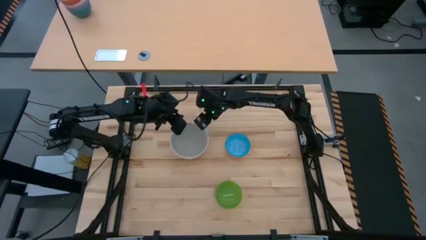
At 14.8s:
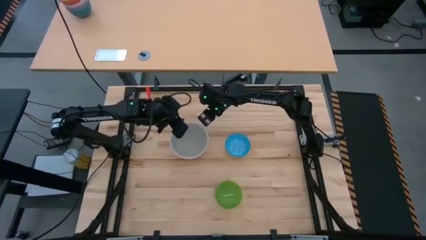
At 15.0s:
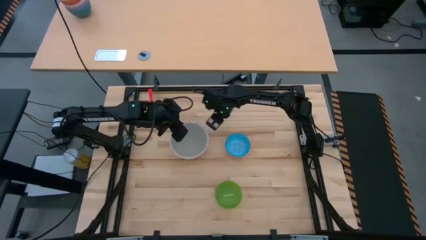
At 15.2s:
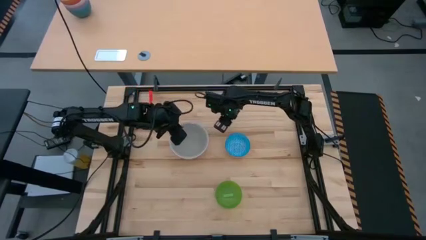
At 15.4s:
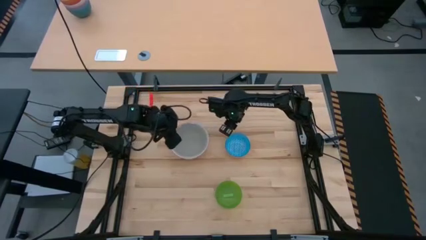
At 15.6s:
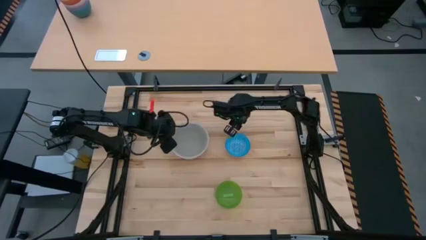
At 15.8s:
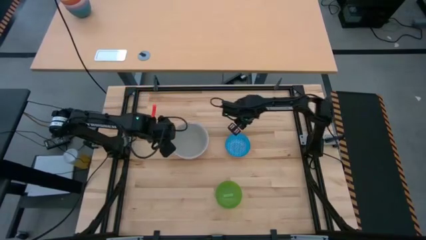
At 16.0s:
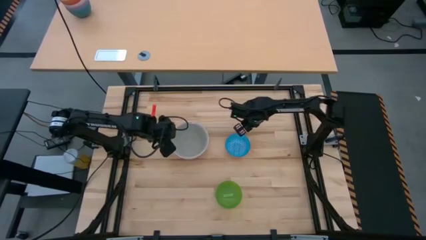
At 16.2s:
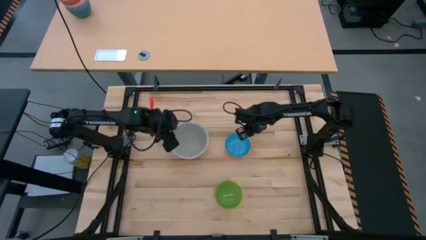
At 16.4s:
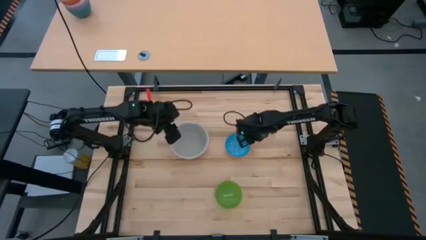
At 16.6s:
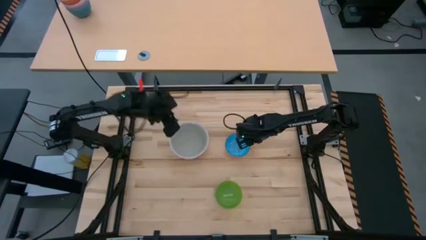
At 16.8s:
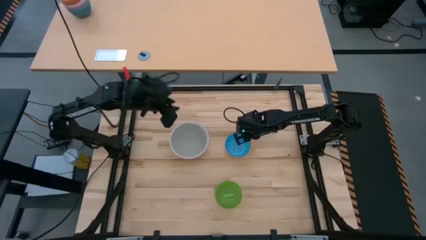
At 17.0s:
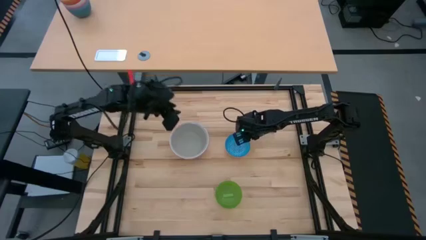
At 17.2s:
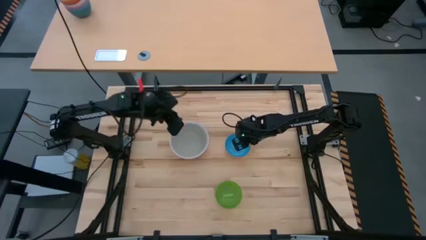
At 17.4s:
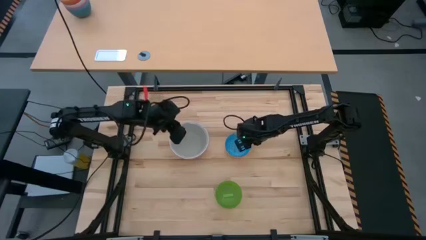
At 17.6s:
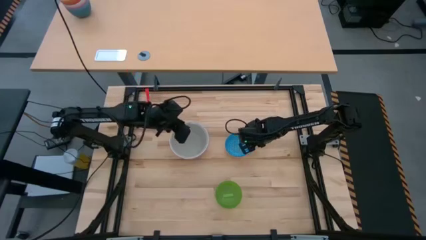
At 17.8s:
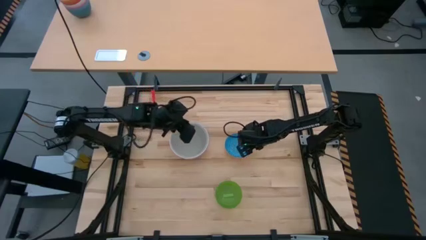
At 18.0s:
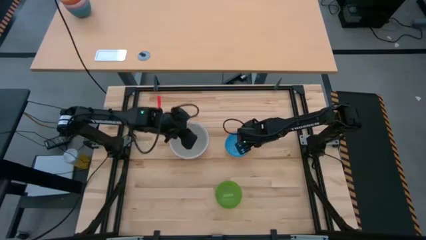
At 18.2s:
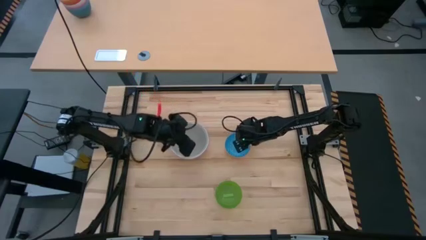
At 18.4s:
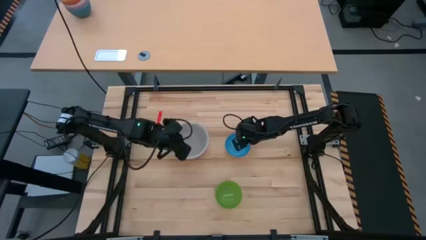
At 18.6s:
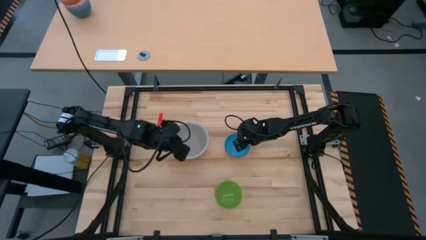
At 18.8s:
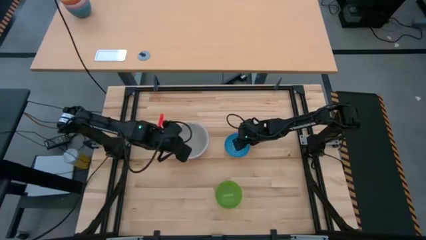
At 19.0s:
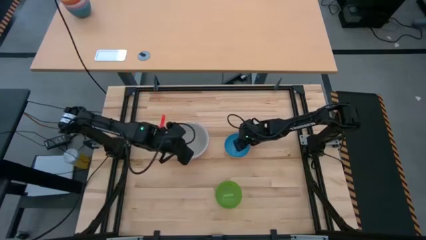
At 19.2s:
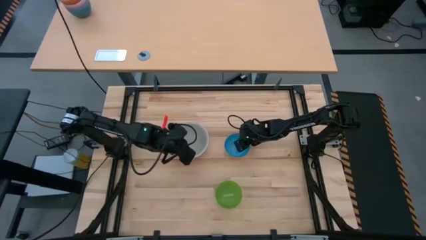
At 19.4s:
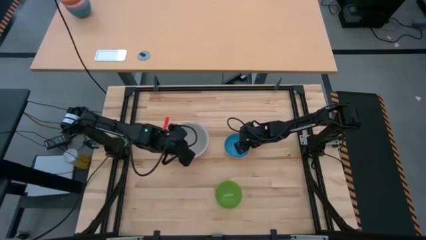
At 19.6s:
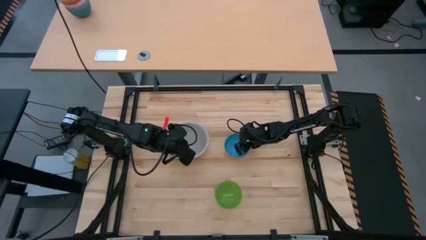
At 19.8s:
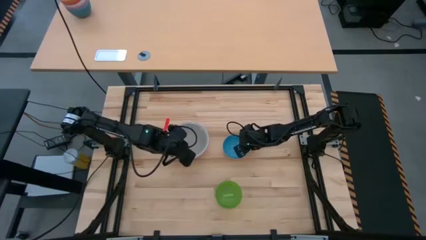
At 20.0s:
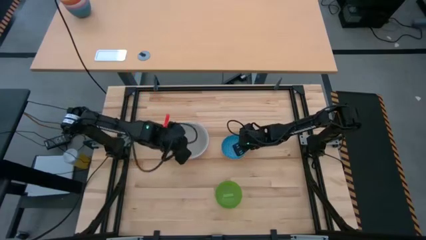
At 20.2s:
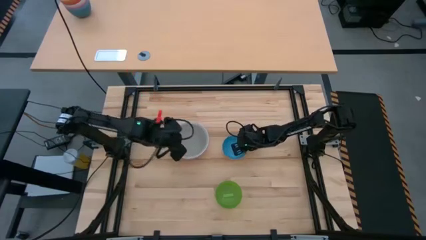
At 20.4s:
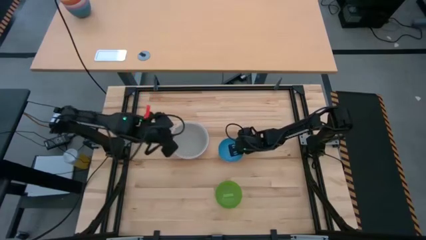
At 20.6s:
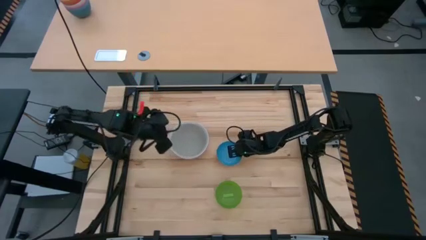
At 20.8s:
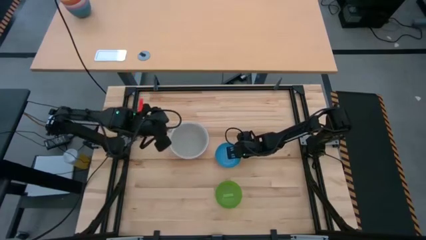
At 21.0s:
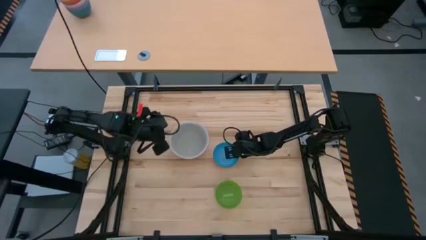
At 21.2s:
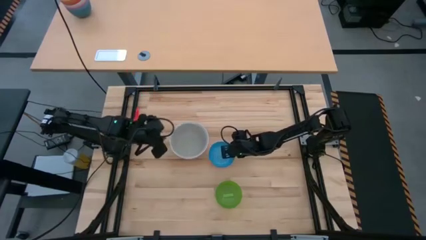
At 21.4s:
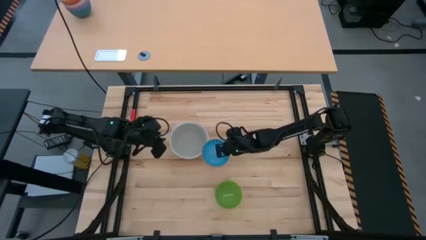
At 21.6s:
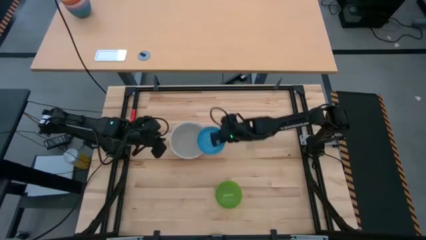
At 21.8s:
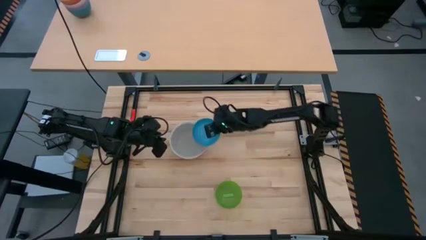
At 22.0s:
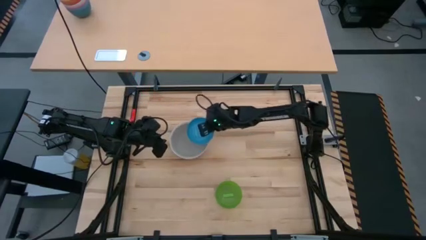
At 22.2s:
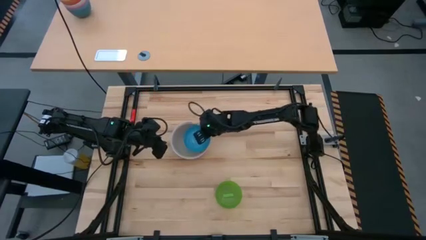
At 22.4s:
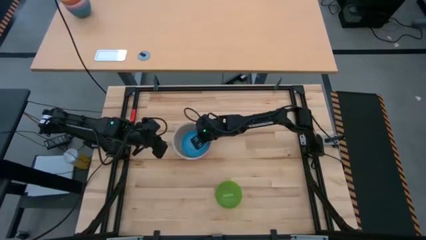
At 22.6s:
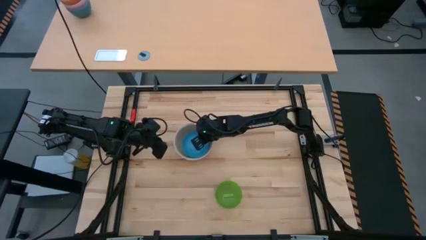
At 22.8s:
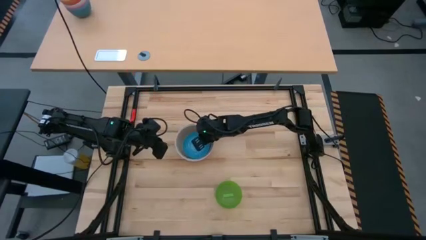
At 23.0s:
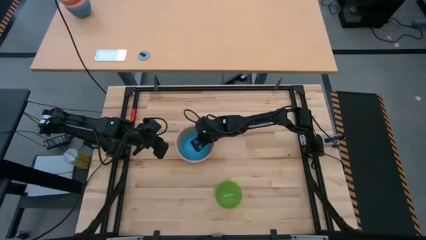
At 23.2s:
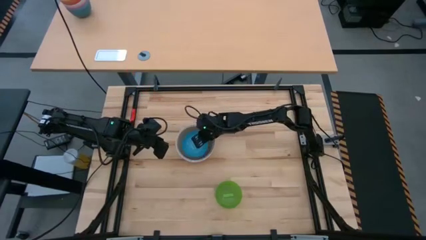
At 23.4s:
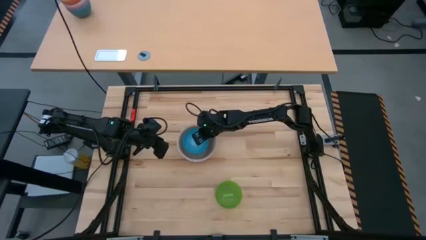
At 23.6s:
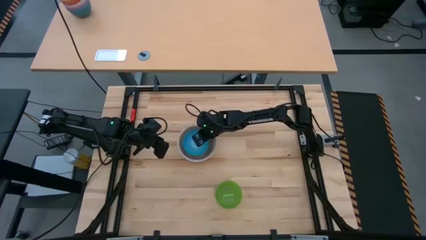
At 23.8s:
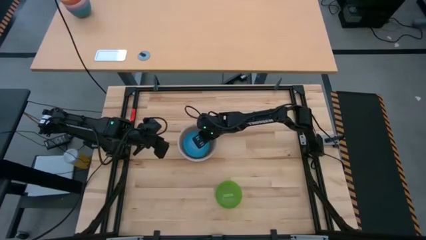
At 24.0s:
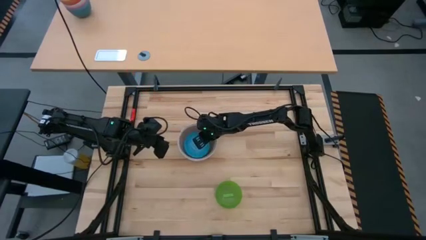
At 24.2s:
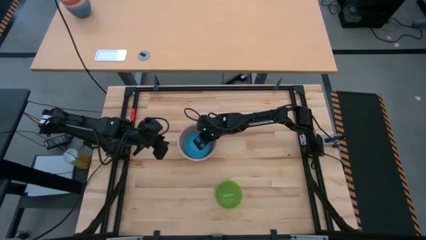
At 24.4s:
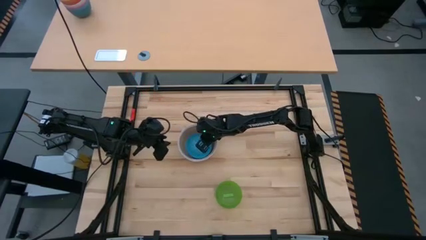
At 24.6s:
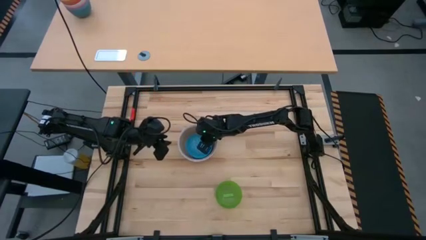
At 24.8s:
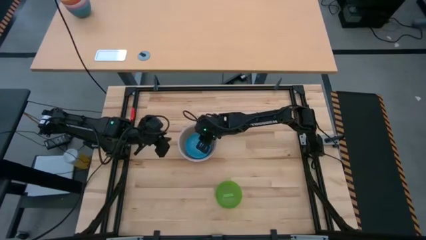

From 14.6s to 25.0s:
Stack the blue bowl on top of the gray bowl

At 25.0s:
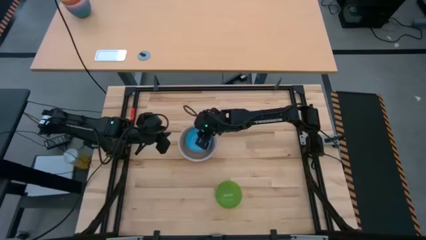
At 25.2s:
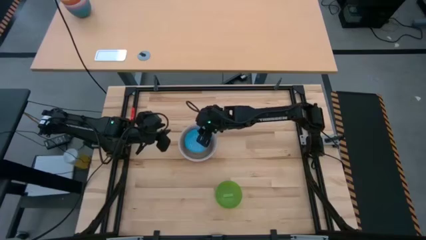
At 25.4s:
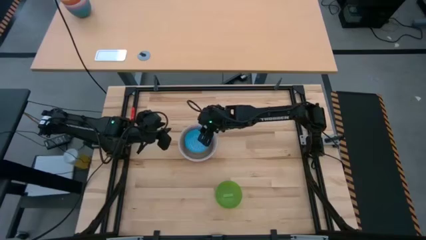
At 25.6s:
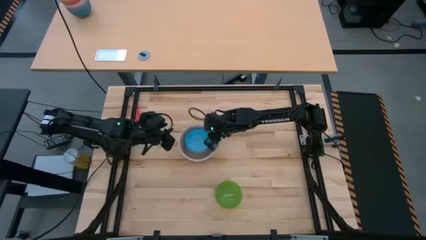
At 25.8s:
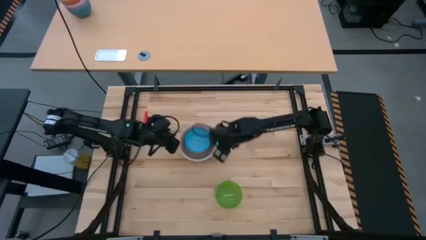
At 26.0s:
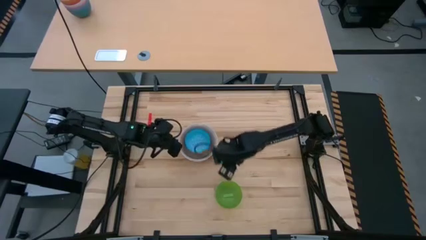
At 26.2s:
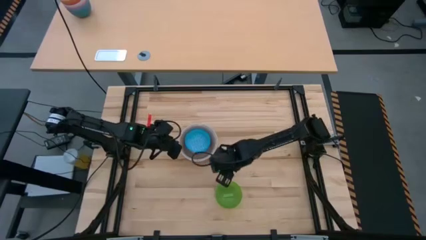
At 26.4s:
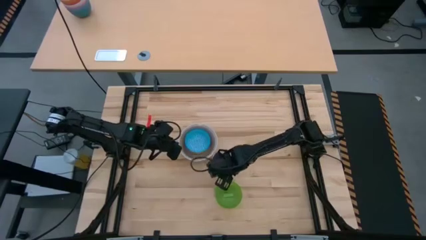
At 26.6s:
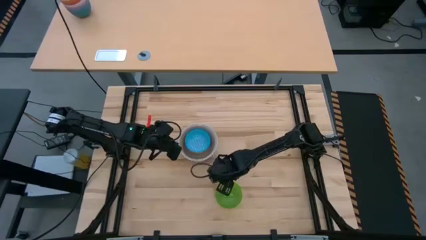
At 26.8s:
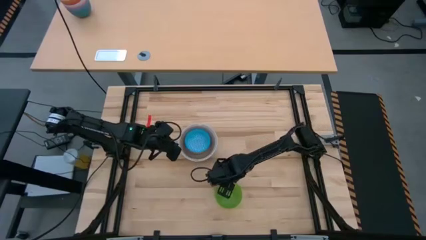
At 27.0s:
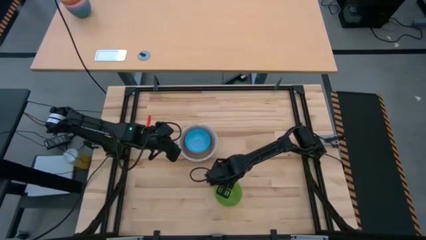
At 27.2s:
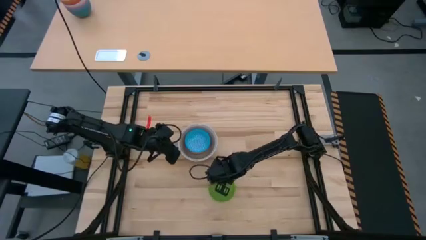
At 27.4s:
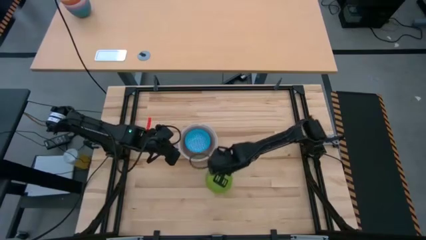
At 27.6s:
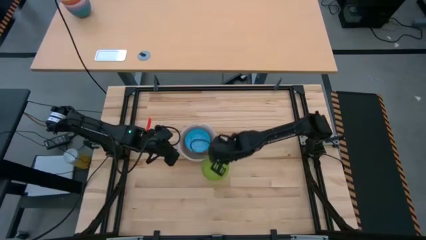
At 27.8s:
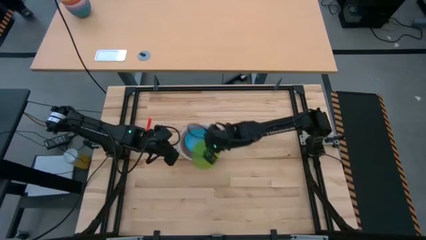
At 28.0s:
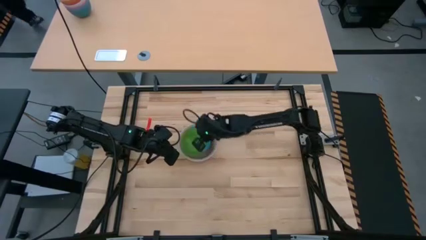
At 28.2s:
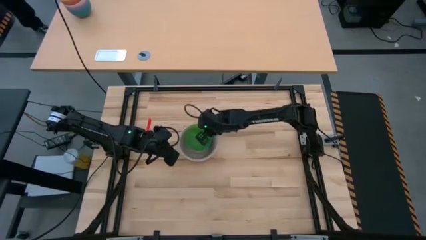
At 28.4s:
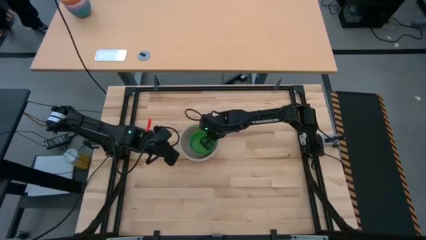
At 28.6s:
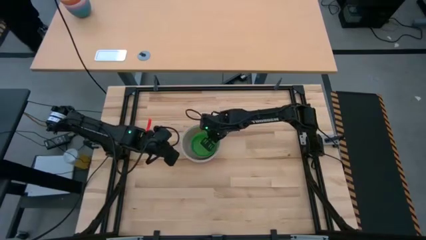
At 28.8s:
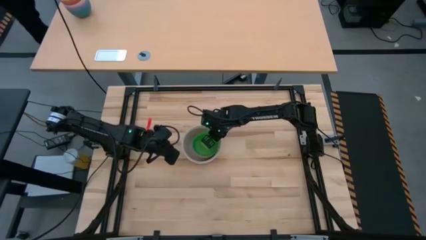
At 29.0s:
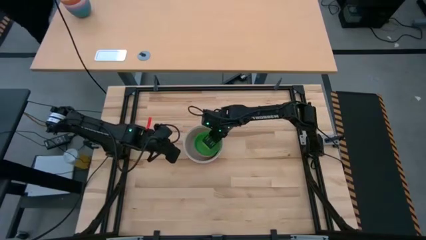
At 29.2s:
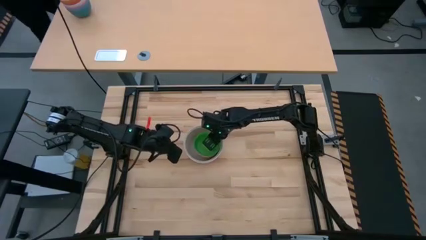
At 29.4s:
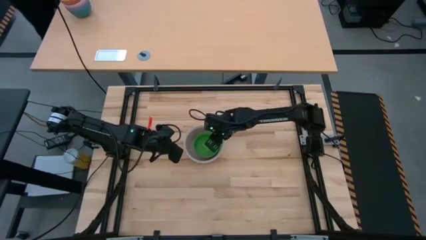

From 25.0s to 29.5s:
Stack the green bowl on top of the blue bowl
